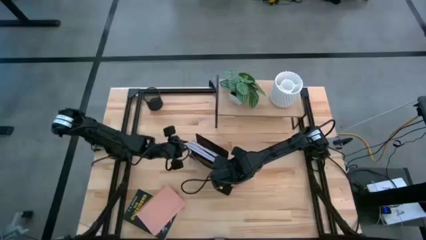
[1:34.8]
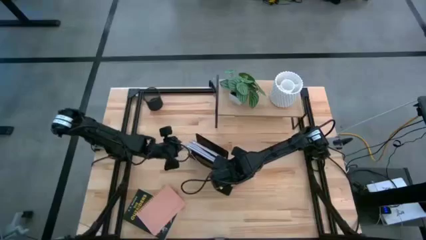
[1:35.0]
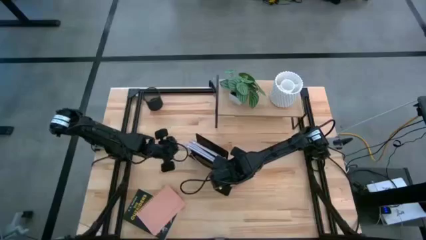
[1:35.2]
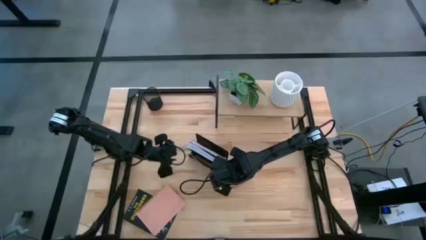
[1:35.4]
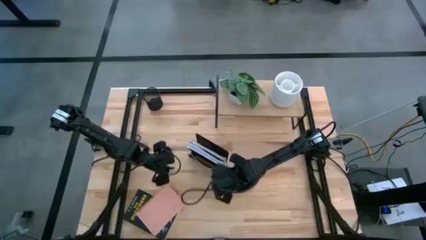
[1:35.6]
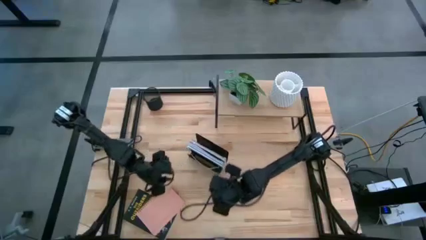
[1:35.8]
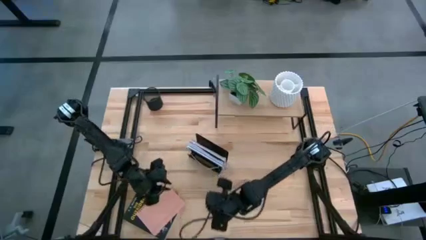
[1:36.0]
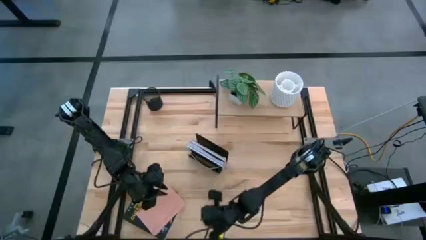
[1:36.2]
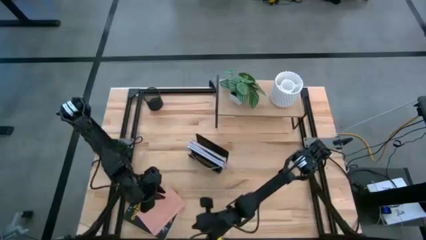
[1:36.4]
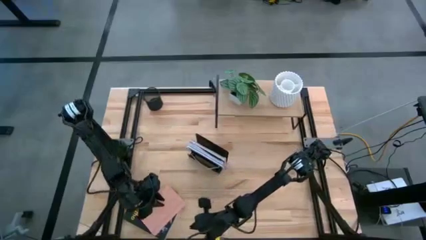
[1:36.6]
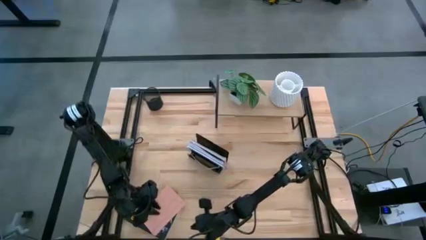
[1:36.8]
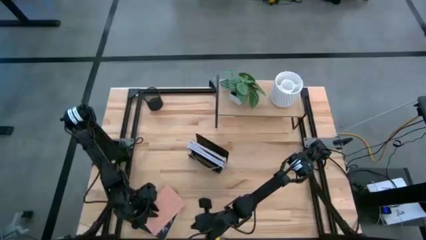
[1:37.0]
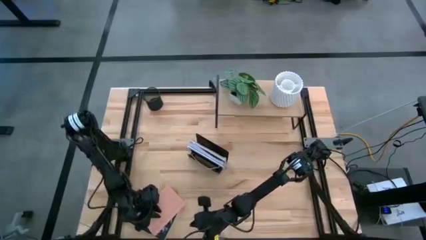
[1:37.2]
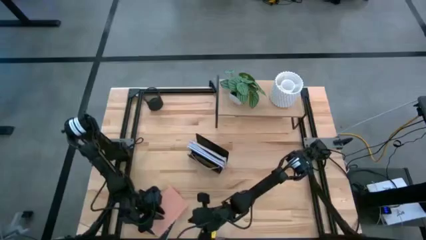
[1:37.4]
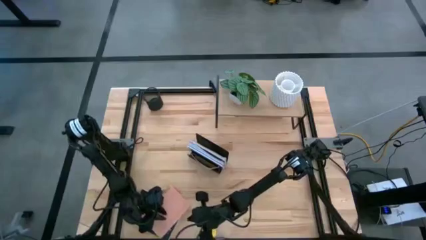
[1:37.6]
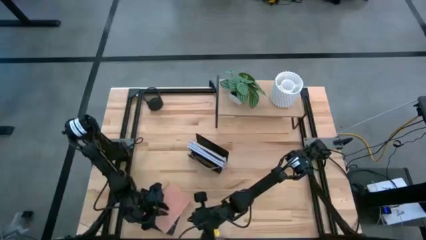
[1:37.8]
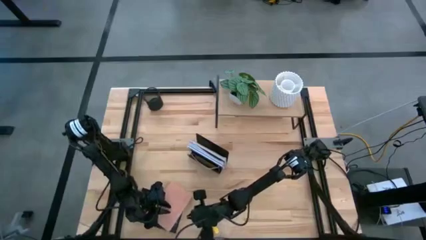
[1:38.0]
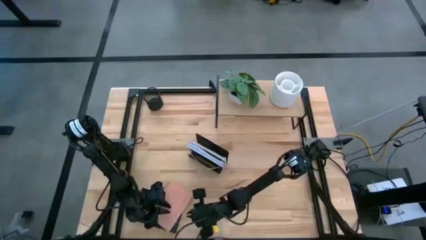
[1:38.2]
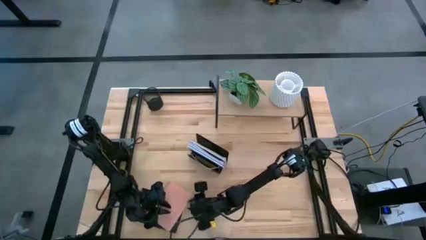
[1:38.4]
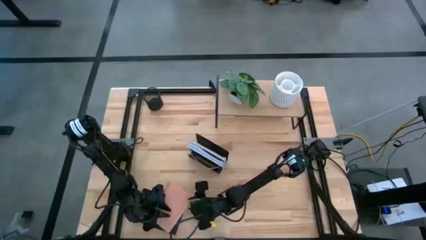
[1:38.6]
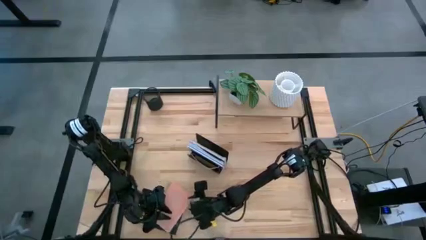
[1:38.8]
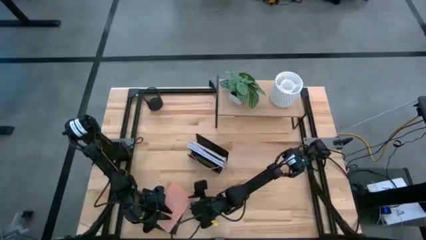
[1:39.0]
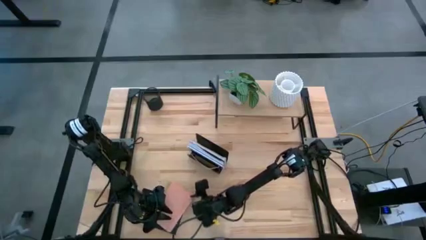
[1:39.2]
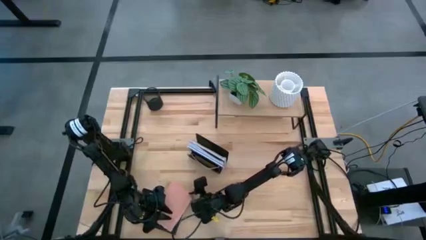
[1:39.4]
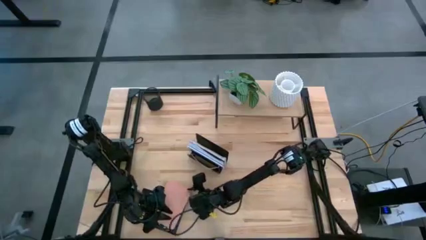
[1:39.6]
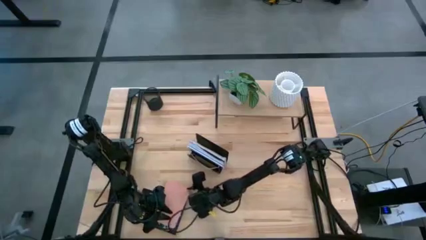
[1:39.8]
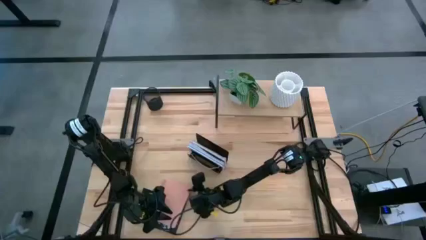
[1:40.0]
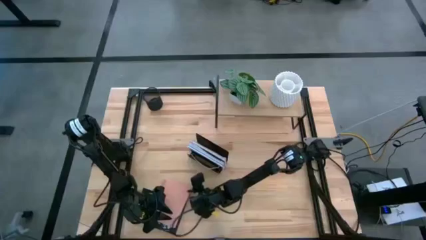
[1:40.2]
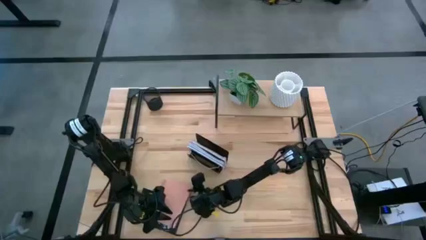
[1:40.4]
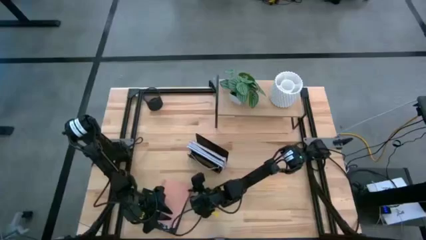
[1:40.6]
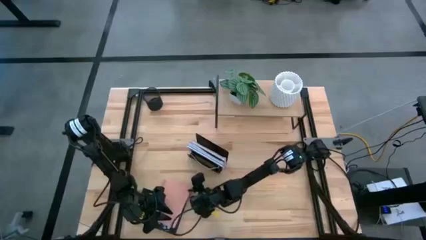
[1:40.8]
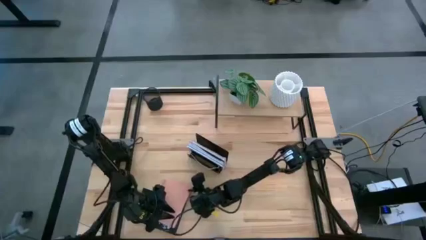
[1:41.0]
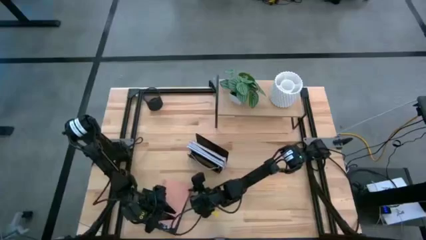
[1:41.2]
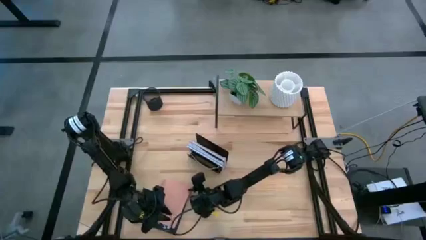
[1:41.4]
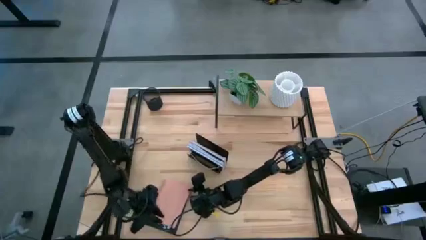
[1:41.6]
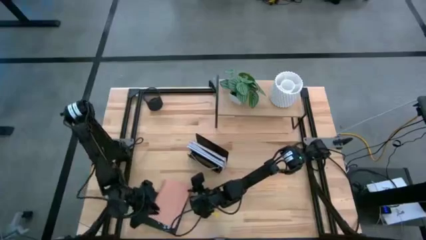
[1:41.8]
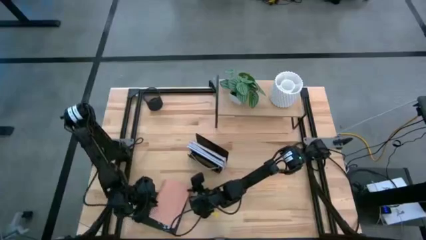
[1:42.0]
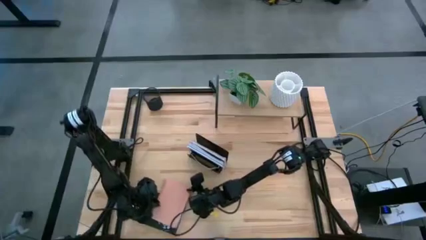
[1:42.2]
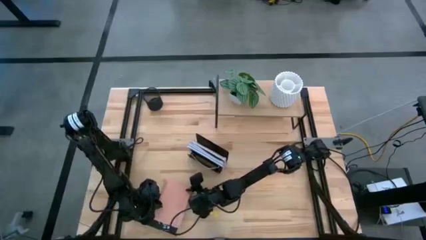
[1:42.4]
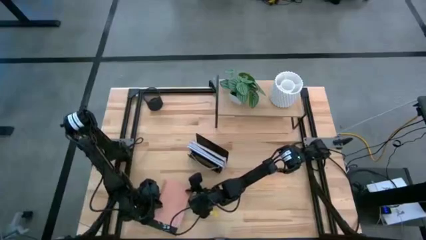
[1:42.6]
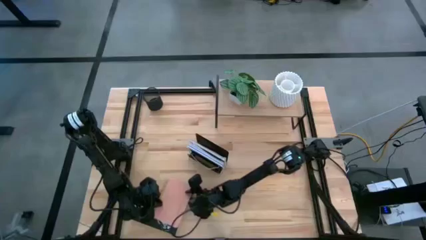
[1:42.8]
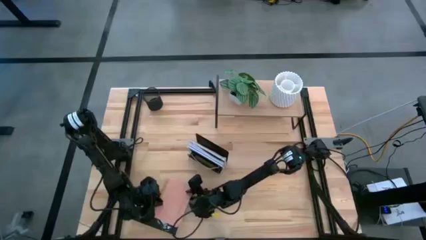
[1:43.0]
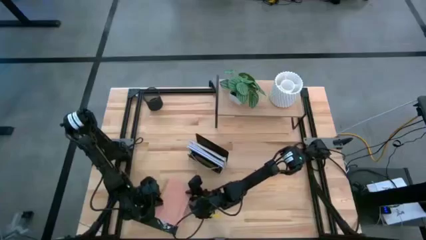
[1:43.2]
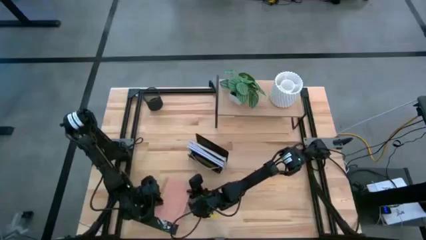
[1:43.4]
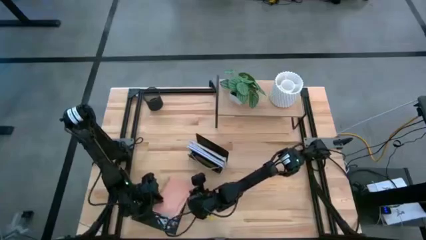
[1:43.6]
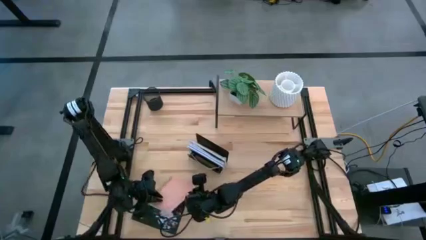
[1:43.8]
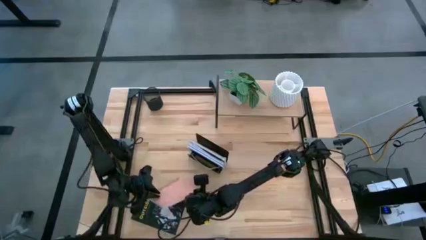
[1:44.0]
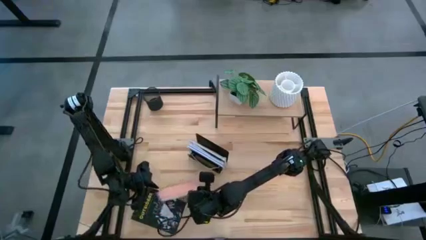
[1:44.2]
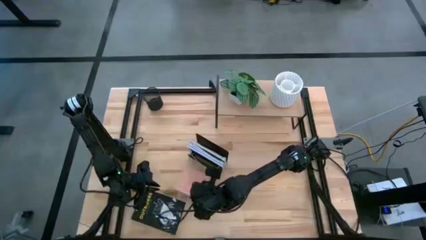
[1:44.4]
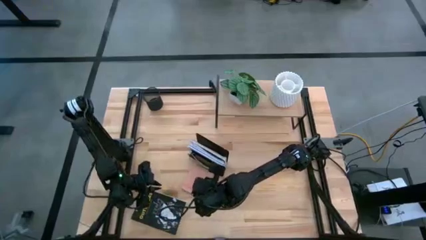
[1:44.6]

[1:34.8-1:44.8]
Task: Stock shelves
Put the pink notebook into the black mesh bookshelf
